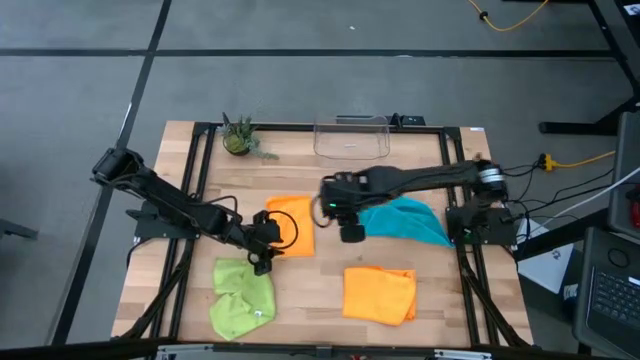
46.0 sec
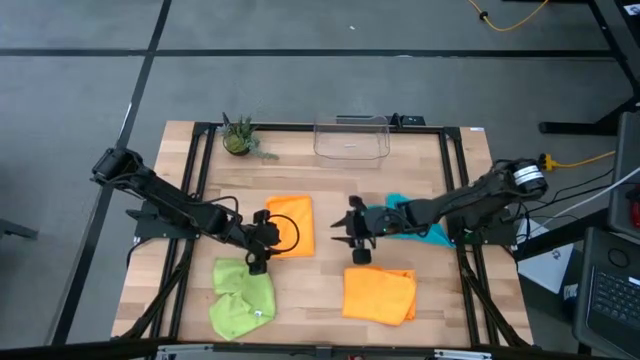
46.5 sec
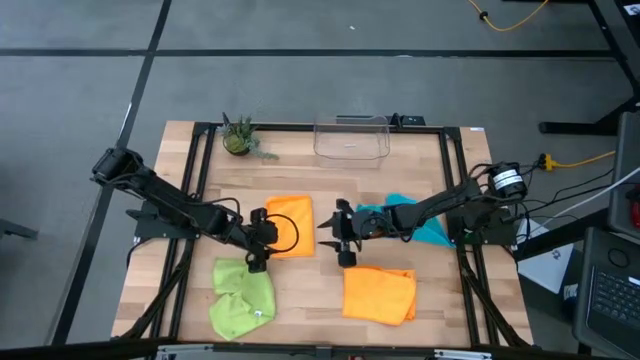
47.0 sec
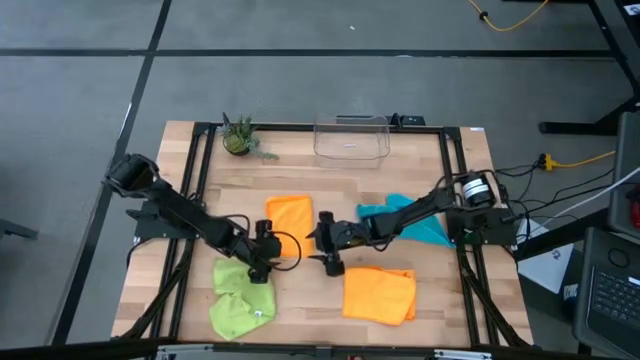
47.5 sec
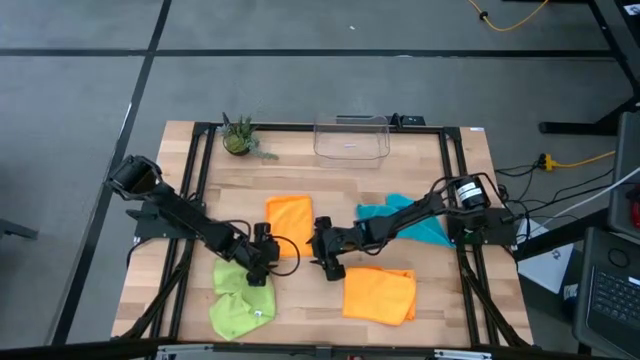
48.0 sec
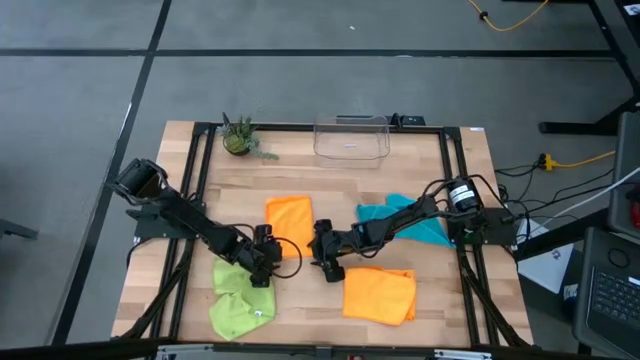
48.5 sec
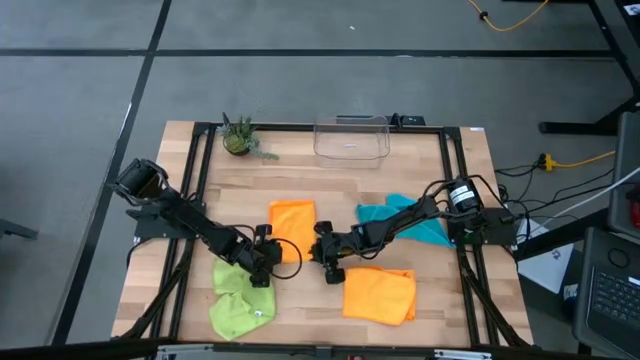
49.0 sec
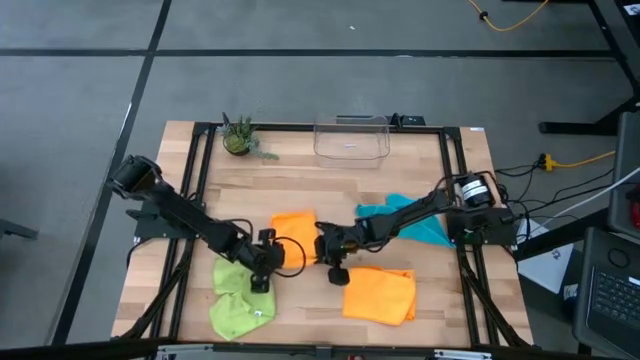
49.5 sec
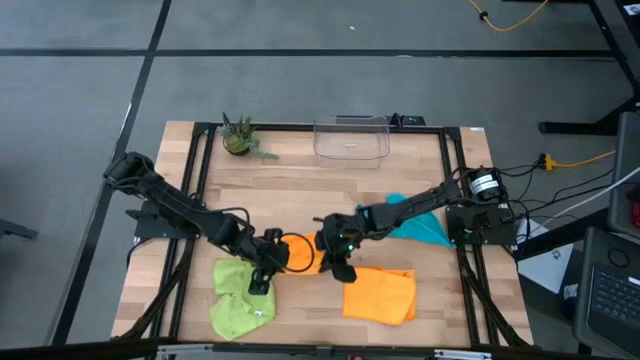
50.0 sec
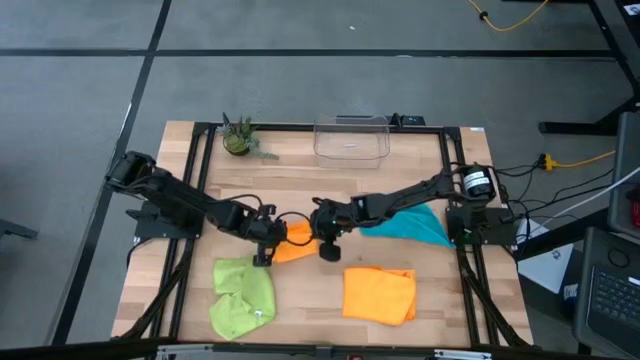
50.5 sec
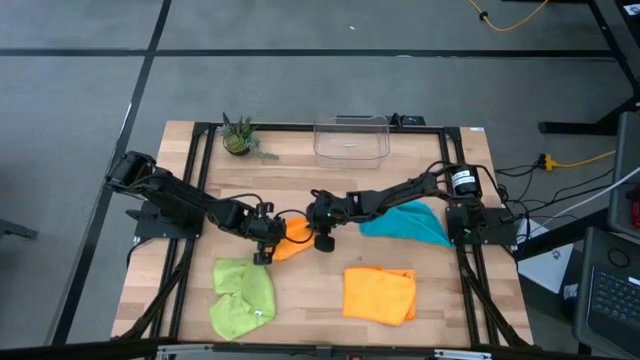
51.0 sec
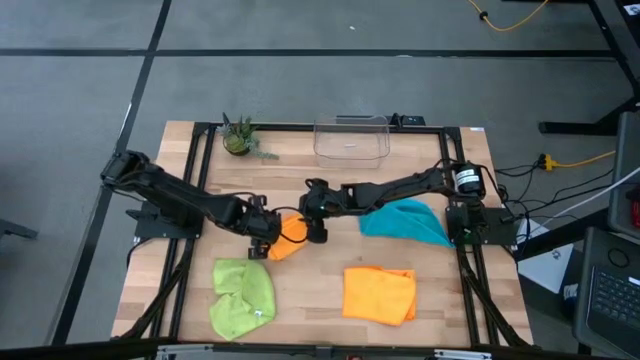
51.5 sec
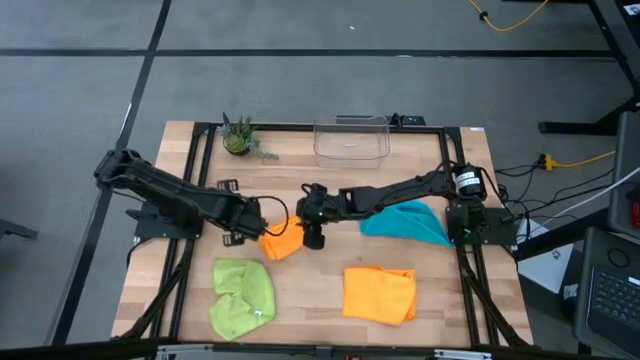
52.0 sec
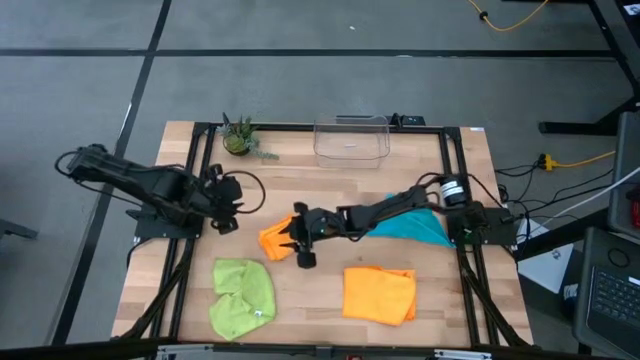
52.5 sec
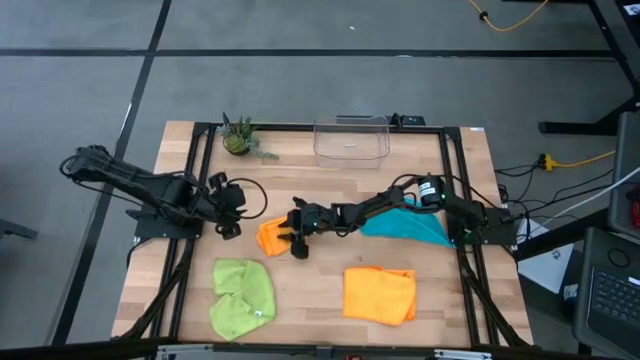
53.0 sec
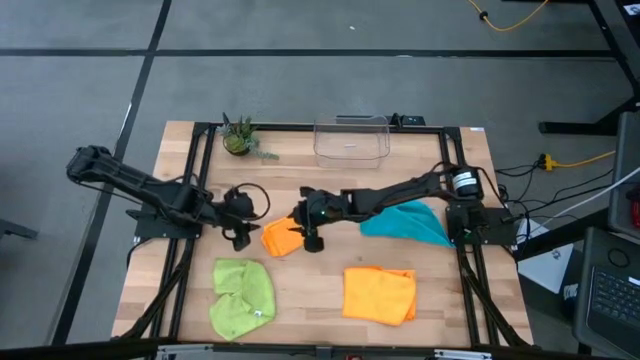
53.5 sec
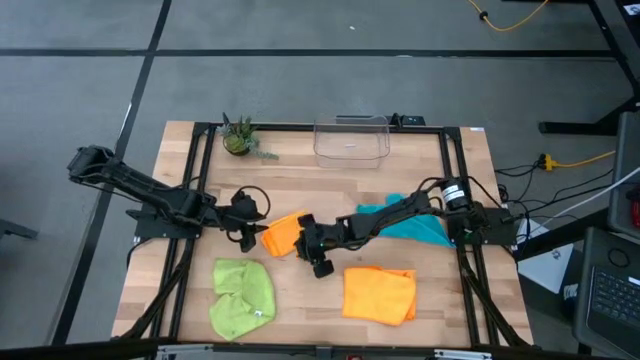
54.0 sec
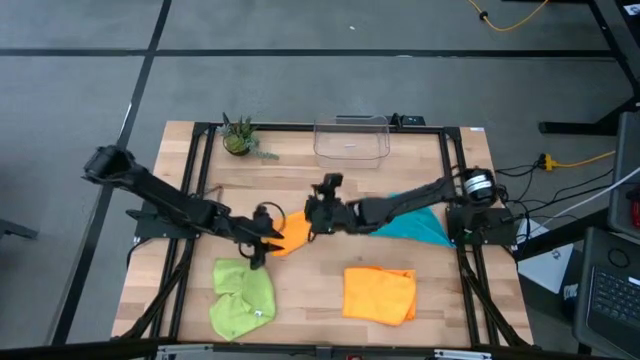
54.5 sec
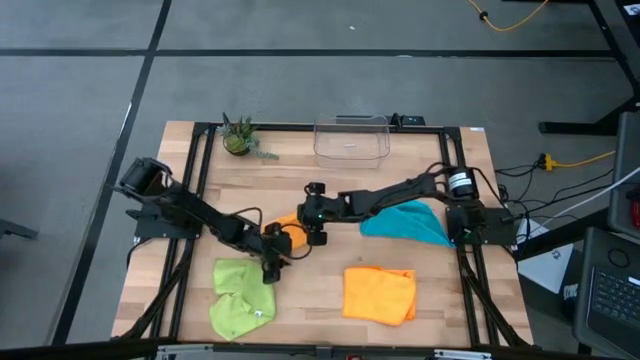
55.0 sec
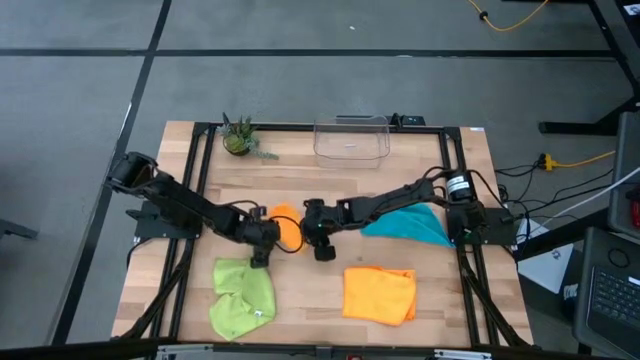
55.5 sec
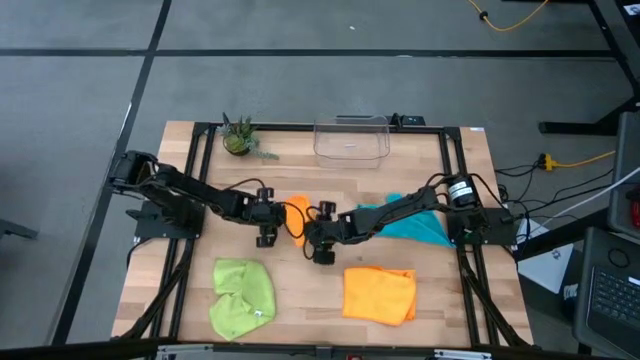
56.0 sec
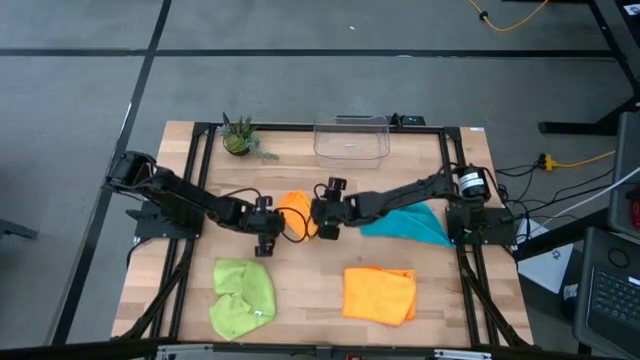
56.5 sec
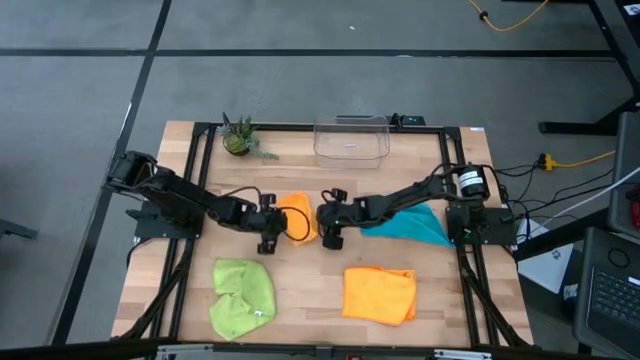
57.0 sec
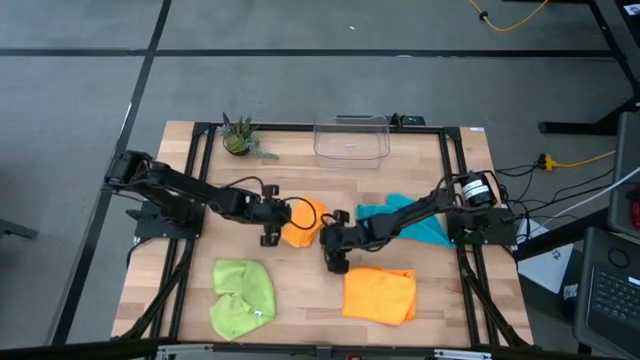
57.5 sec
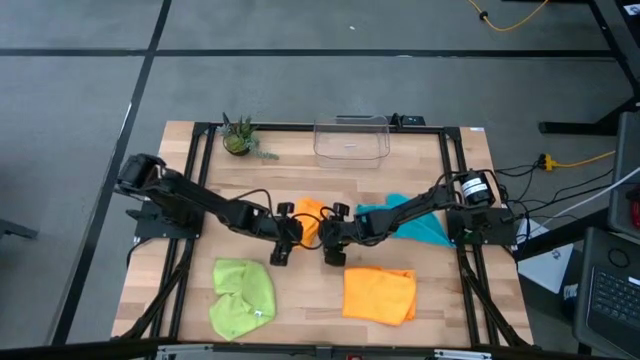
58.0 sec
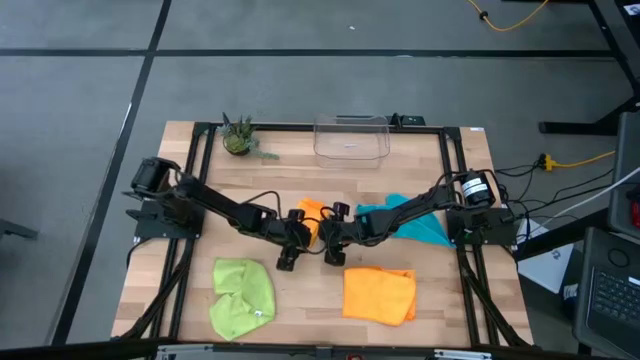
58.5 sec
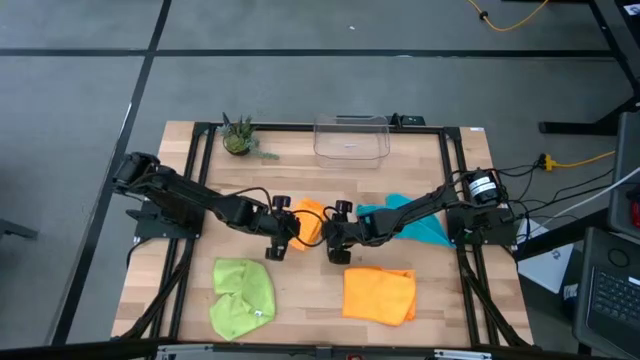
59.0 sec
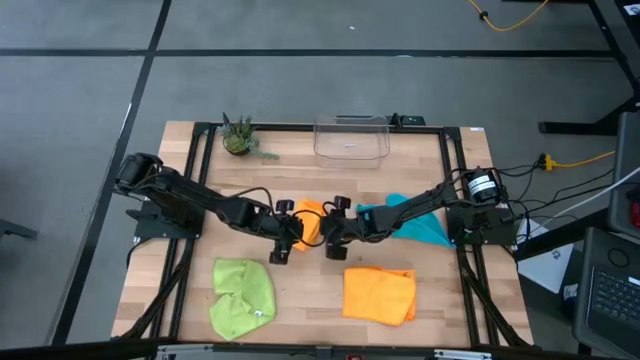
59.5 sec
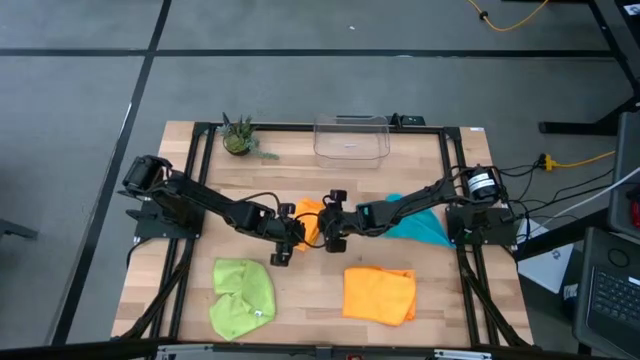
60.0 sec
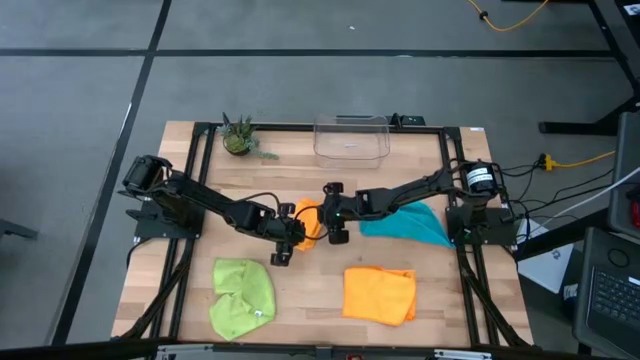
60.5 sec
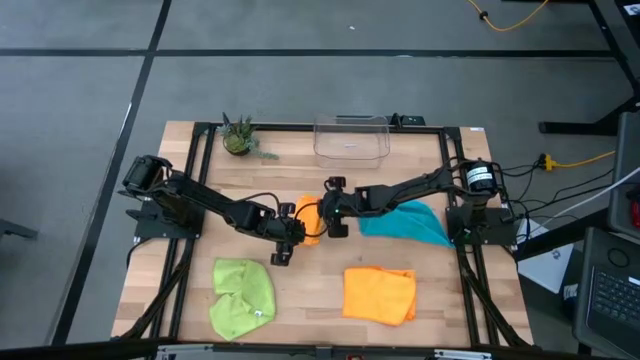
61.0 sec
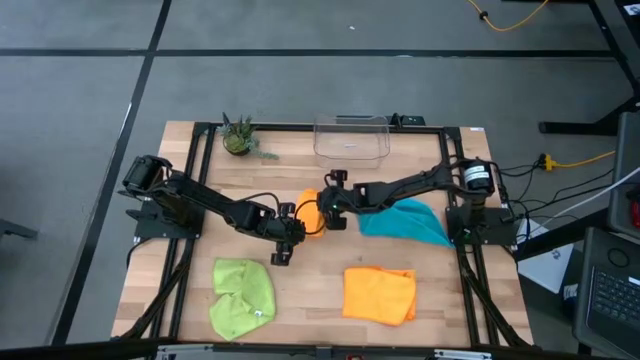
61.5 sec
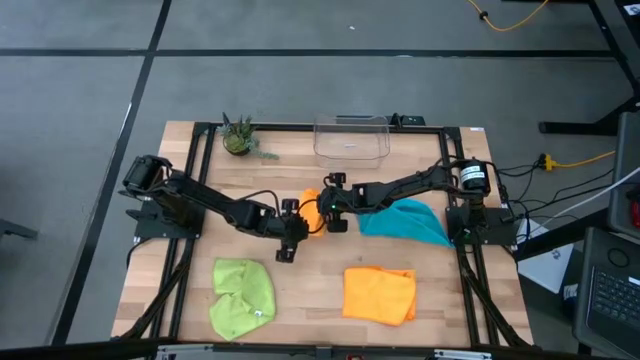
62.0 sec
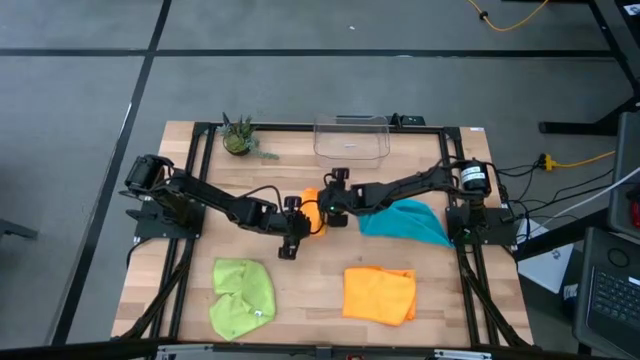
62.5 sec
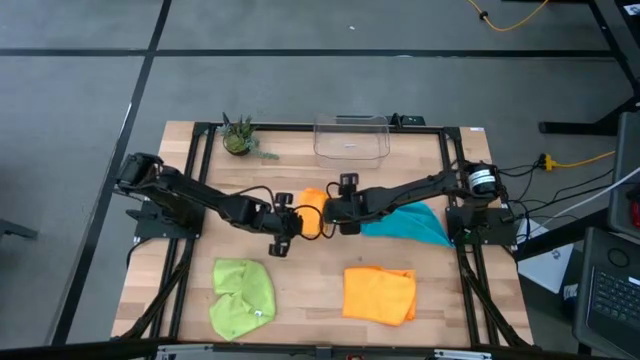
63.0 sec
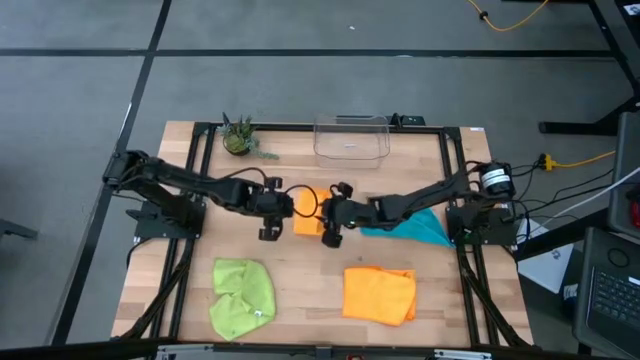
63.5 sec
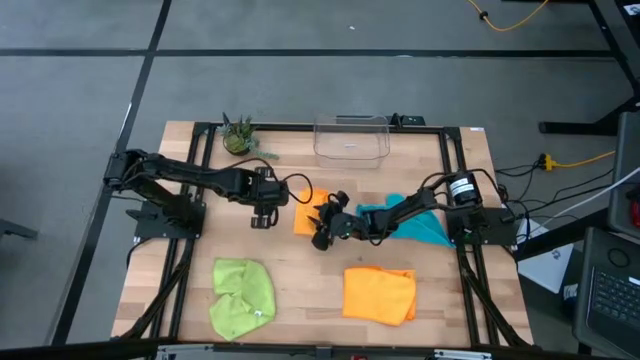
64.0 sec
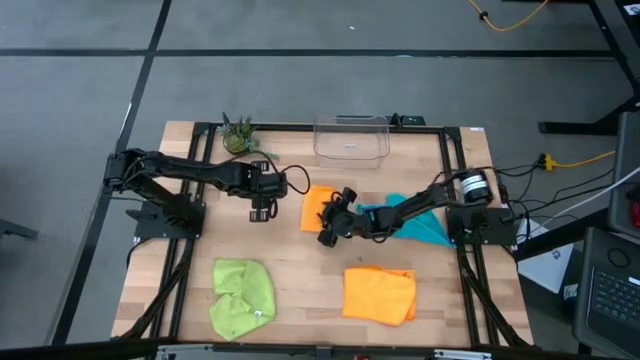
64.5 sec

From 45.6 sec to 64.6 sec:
Task: Fold microfiber towels
Fold the top orange towel on the table

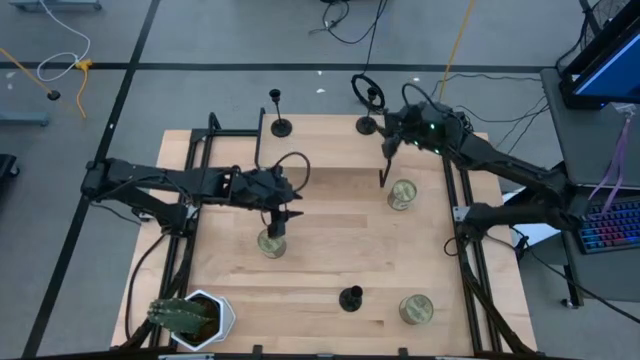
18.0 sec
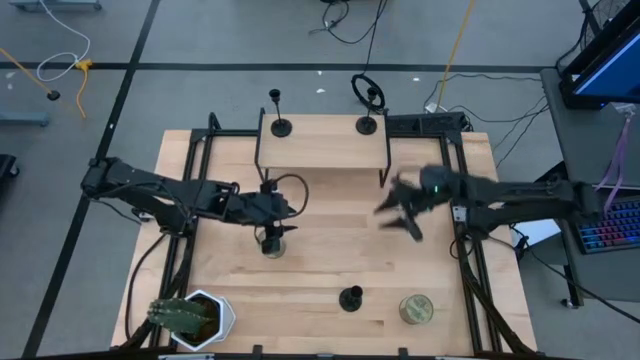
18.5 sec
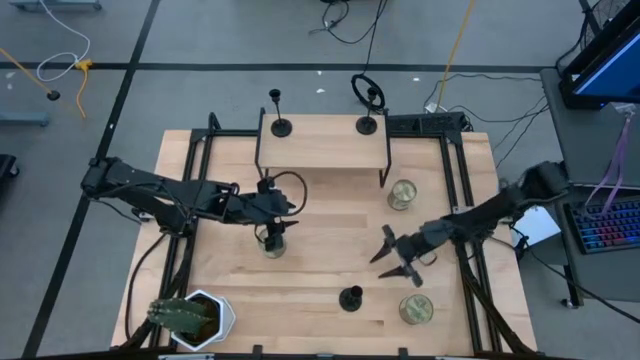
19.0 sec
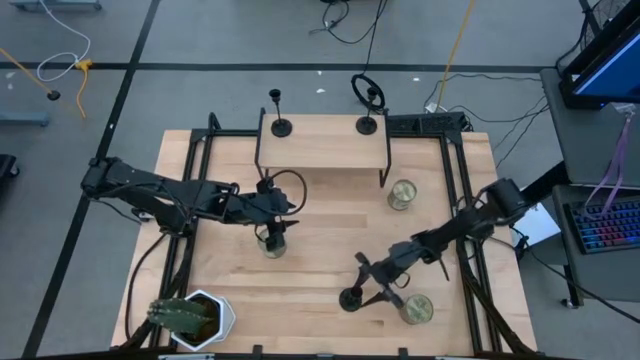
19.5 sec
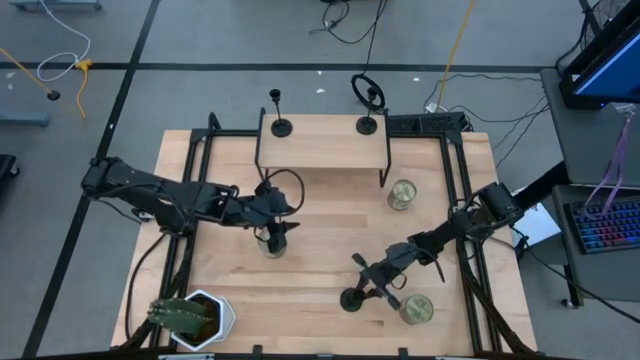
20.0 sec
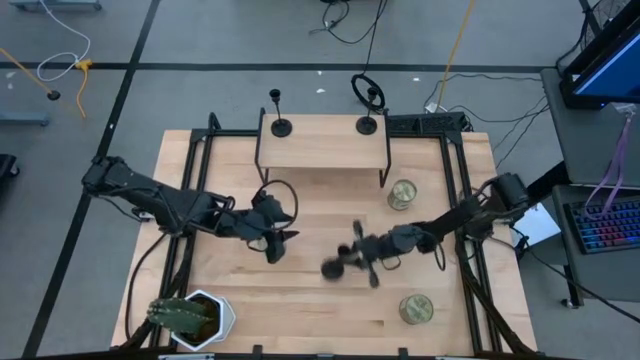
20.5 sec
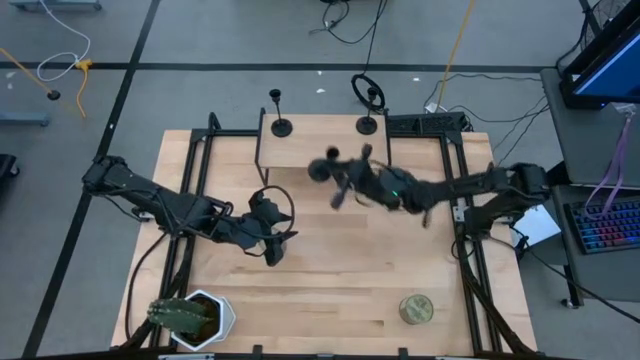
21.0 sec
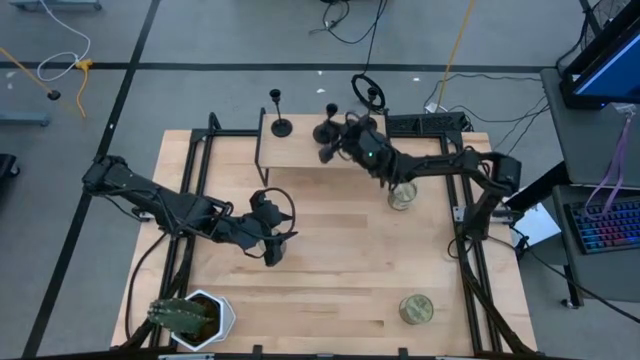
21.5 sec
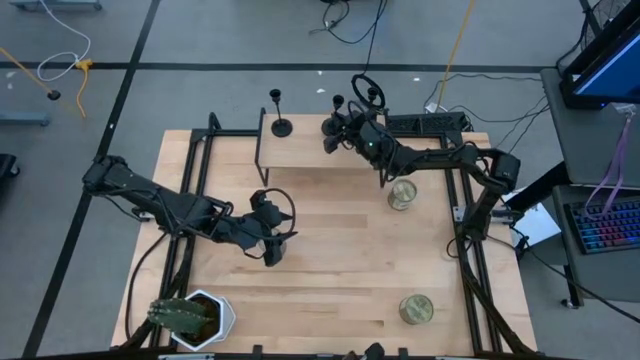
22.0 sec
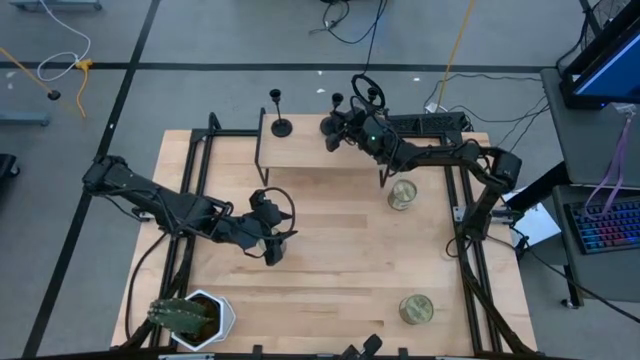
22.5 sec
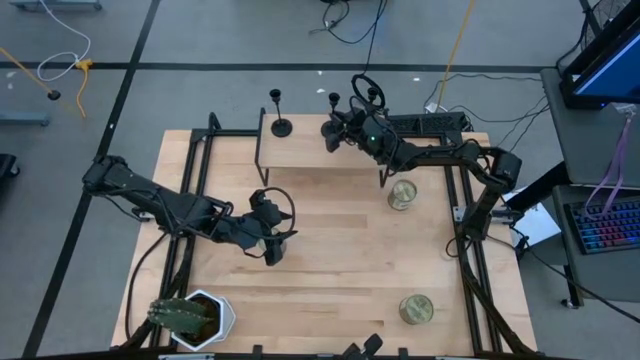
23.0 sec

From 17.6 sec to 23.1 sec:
Task: Pick & Place candle stick holders
Put the black candle holder on the shelf
